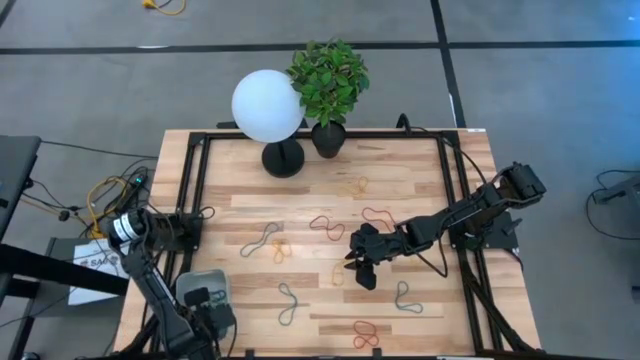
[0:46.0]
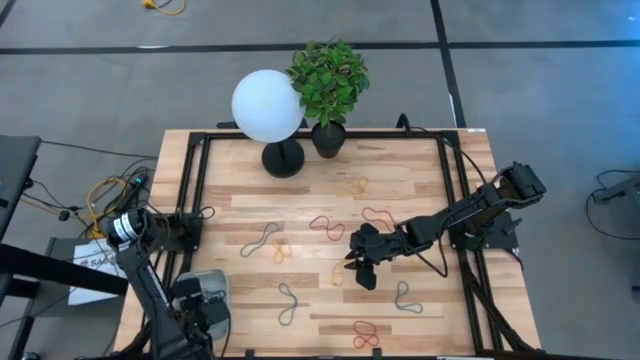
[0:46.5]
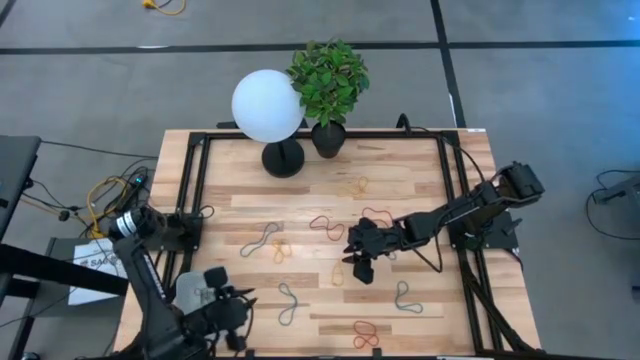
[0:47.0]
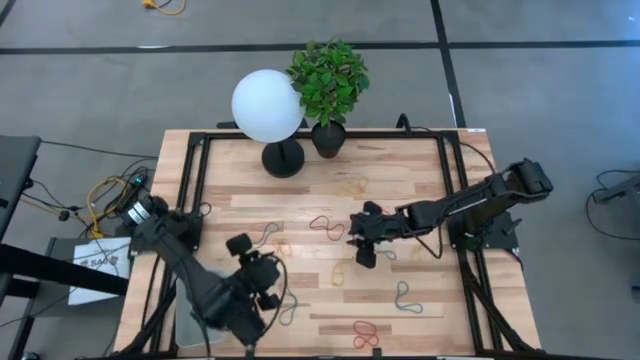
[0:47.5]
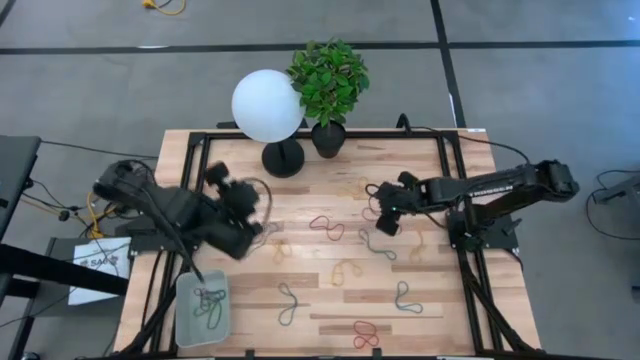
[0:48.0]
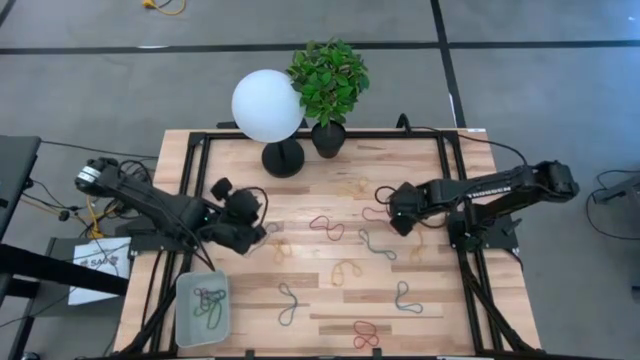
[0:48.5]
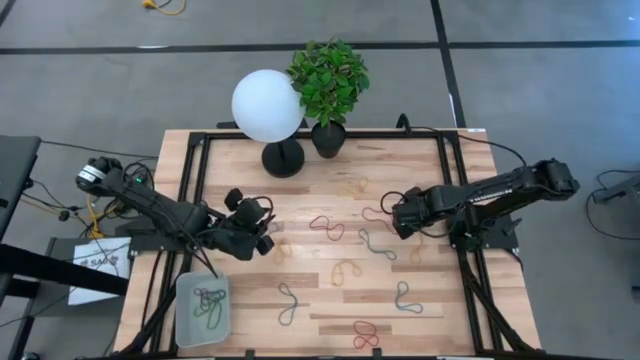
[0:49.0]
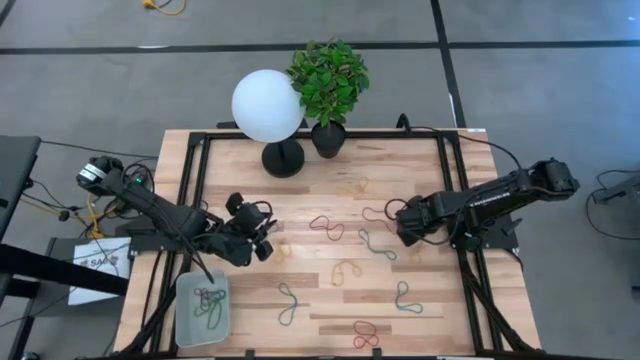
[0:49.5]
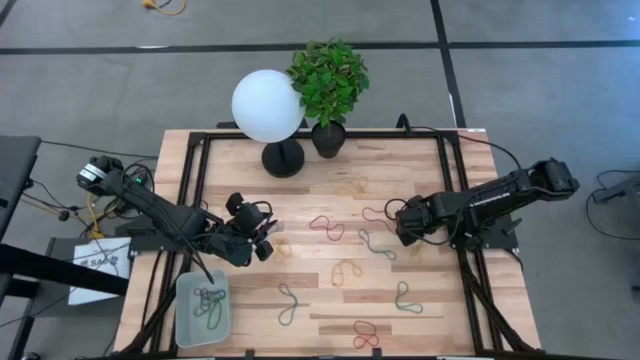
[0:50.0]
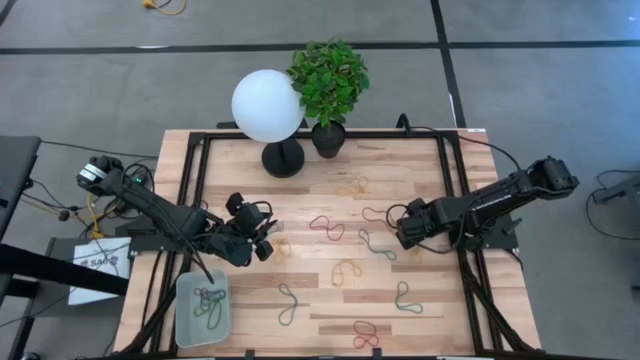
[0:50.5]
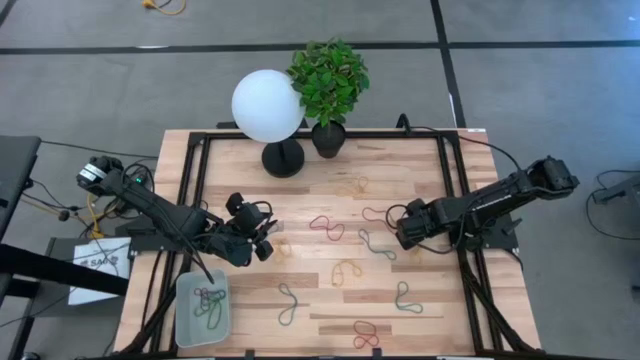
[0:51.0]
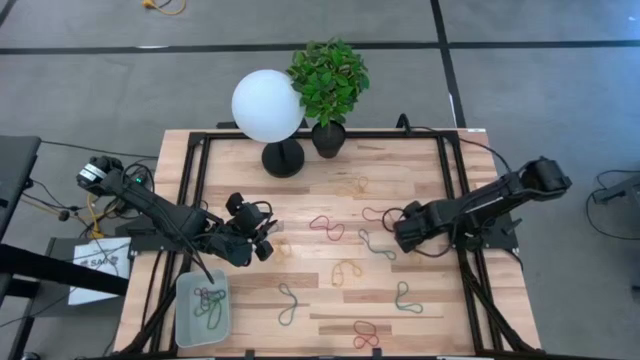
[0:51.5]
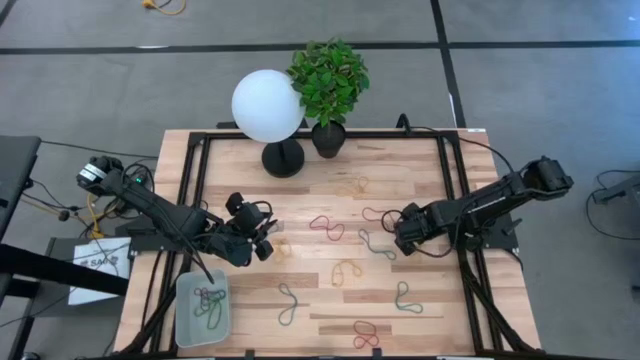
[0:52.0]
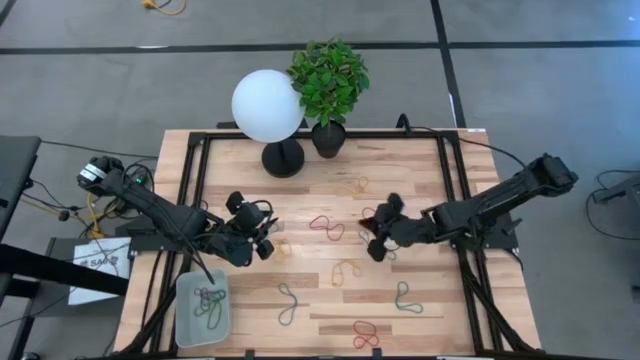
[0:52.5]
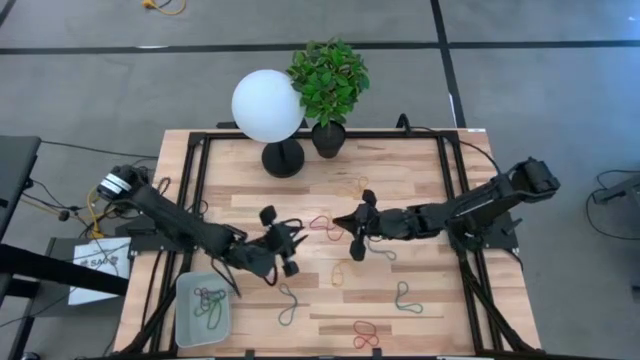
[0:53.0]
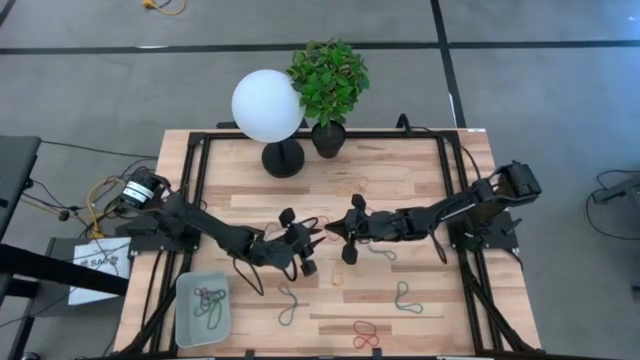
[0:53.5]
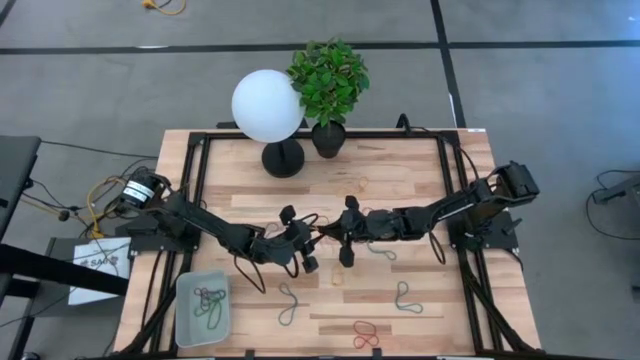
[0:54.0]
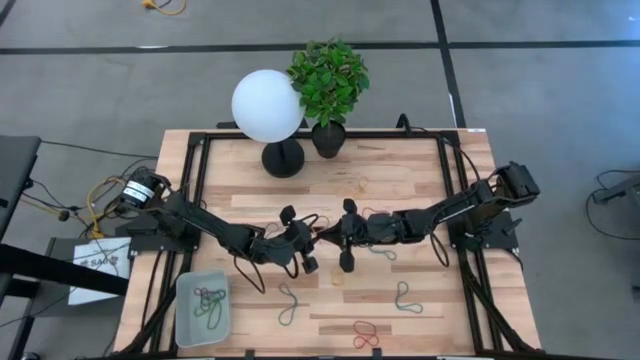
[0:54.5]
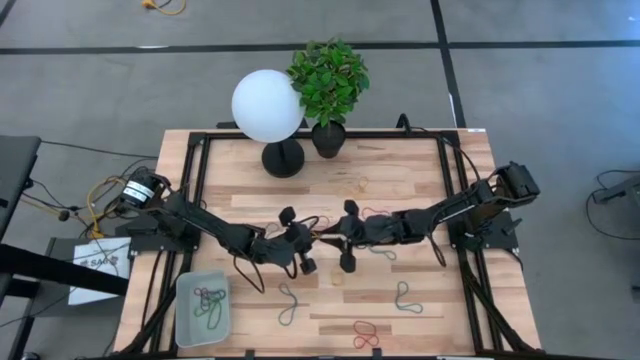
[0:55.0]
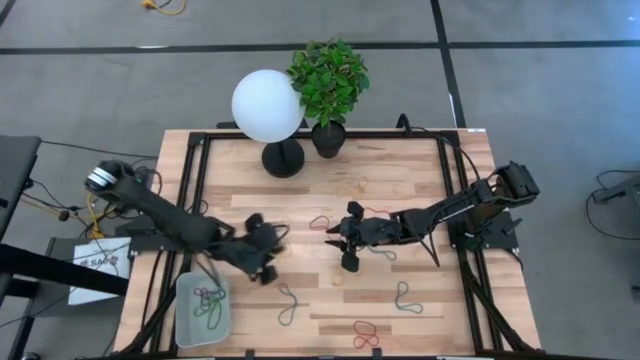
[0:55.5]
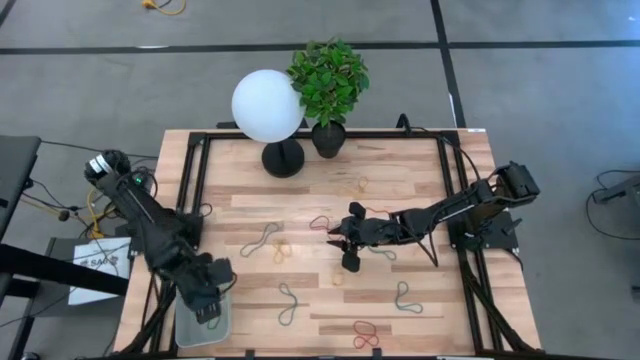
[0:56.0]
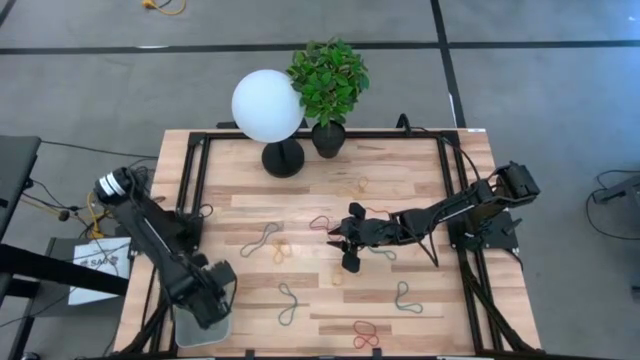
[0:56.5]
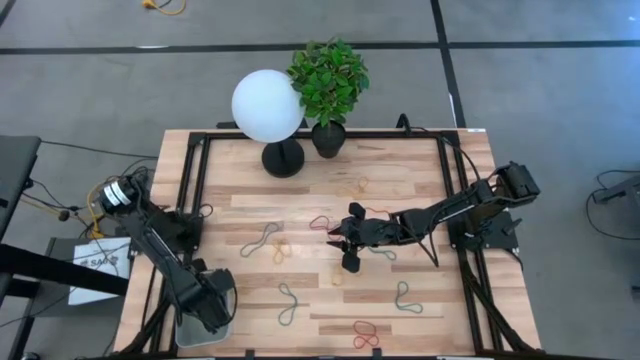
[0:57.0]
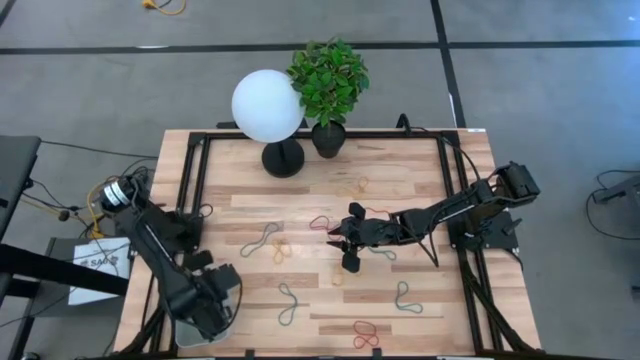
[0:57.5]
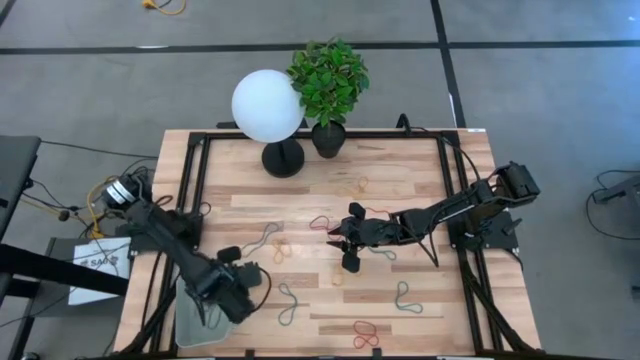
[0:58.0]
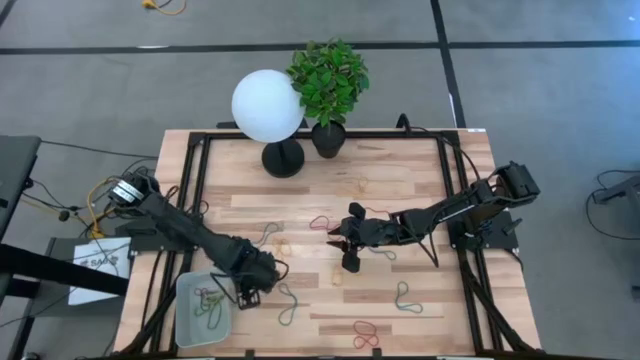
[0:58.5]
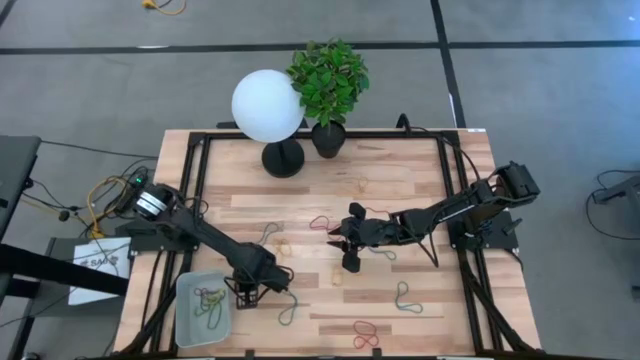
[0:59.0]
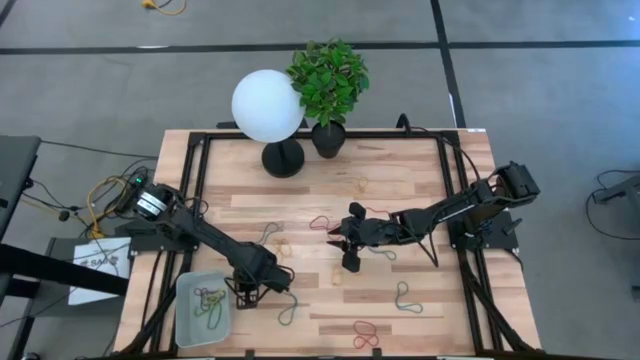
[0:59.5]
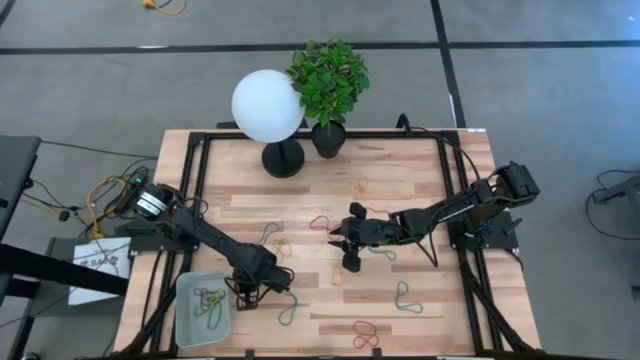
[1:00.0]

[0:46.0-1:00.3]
Task: Pick and place items into bin
Put the yellow rubber band into the gray bin

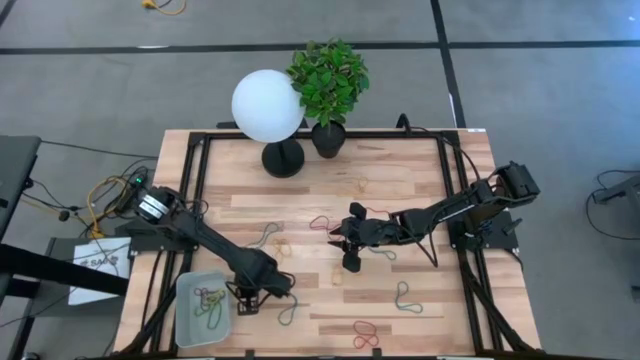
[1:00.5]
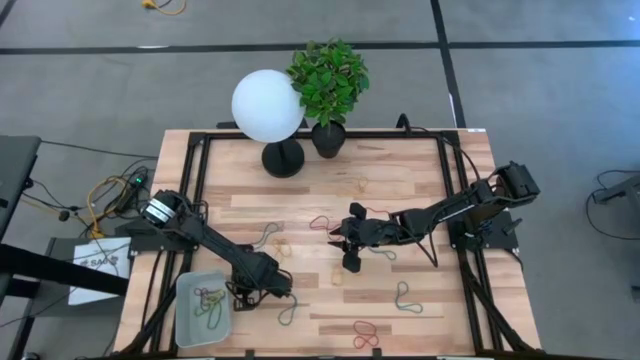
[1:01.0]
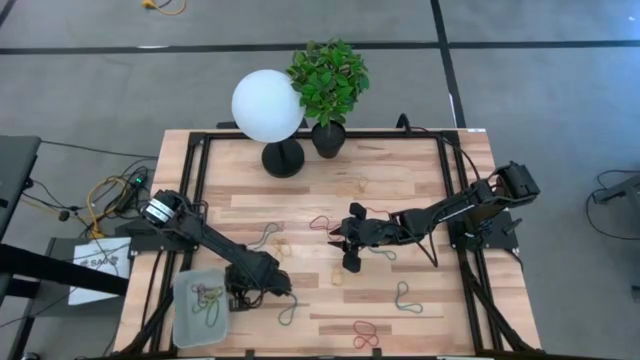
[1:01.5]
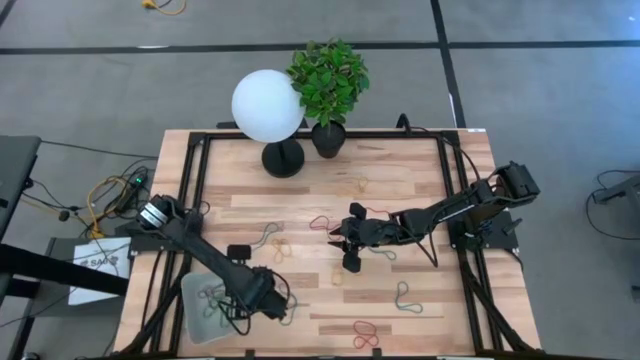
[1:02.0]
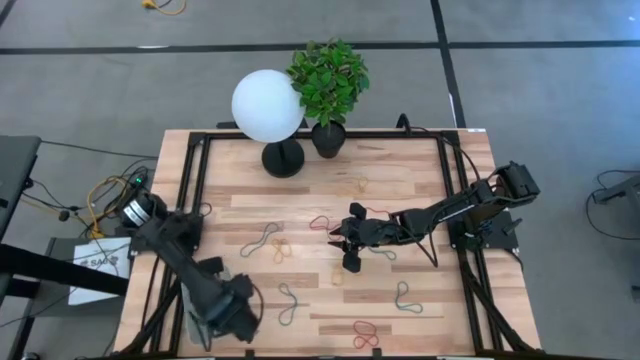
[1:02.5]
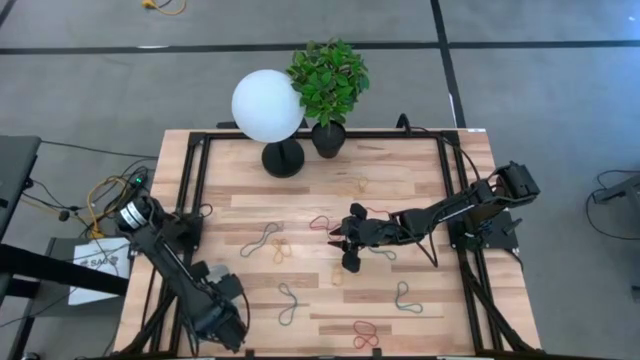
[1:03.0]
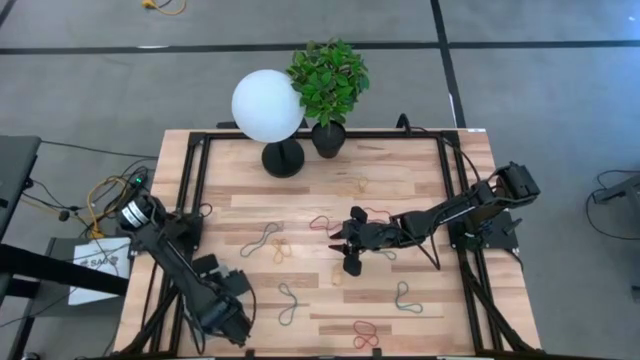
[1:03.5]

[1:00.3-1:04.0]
Put the yellow rubber band into the gray bin

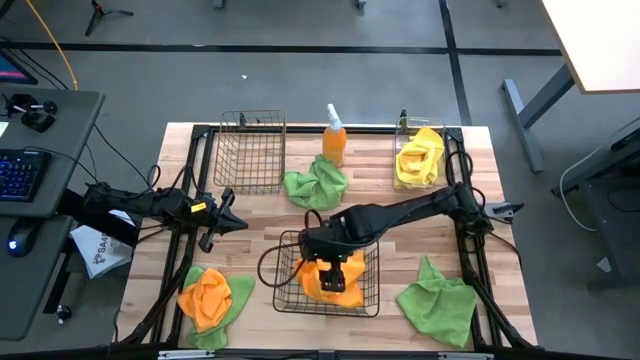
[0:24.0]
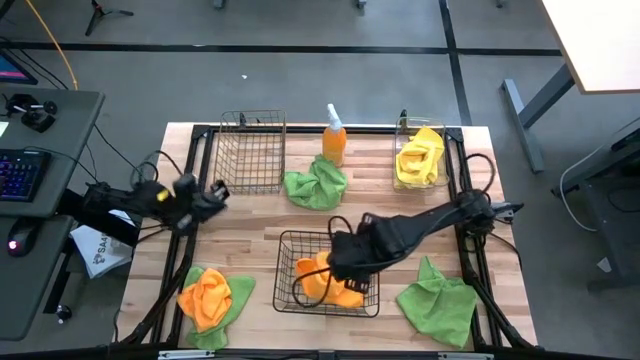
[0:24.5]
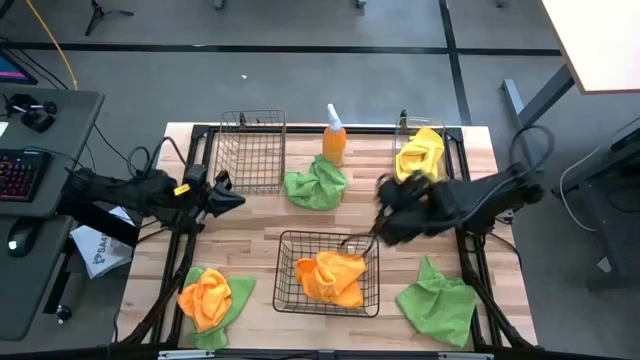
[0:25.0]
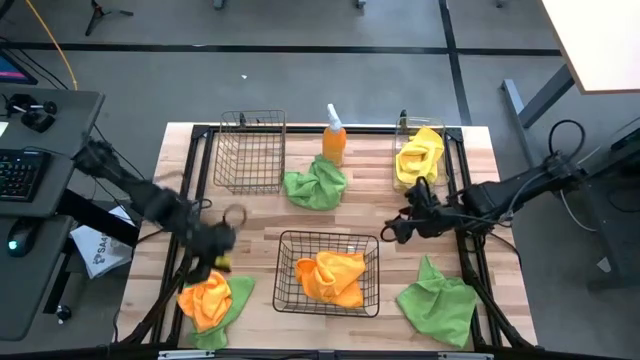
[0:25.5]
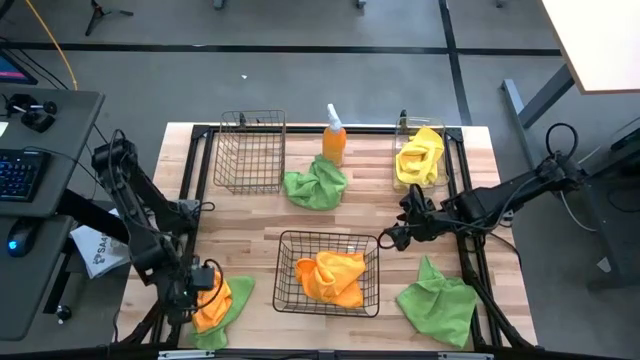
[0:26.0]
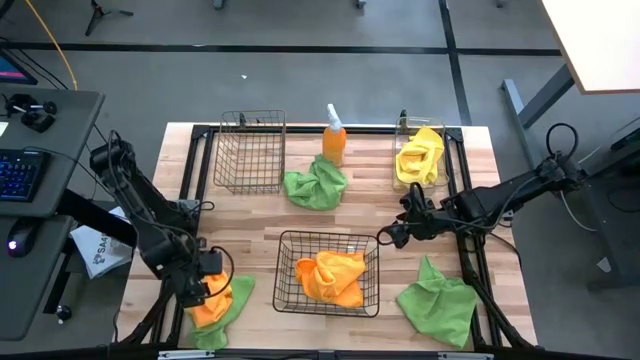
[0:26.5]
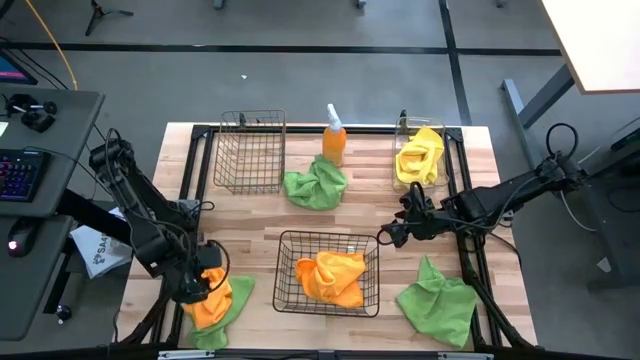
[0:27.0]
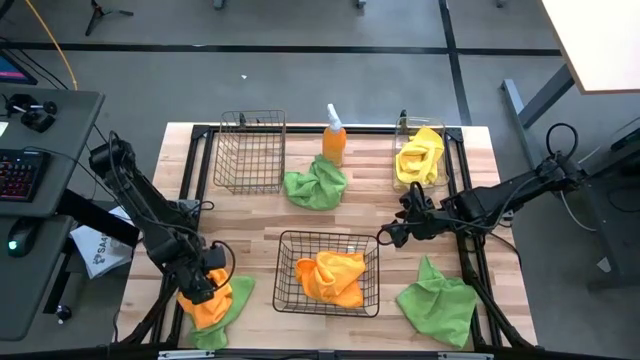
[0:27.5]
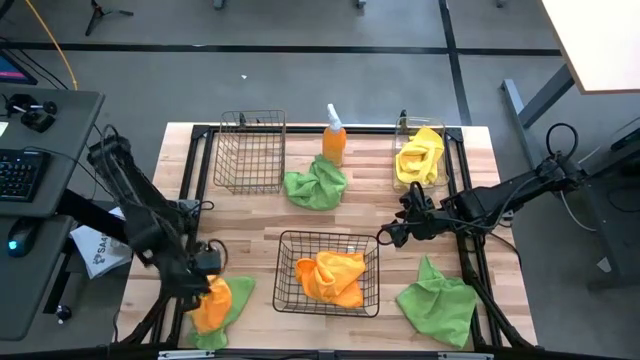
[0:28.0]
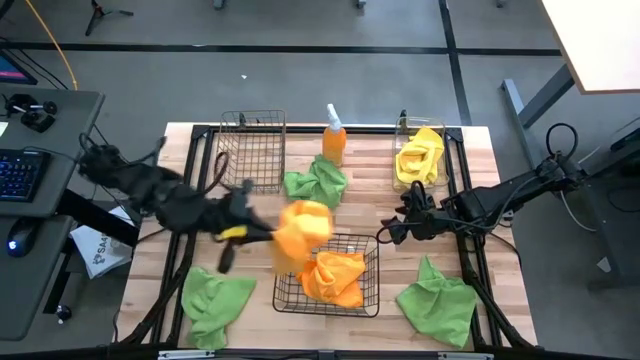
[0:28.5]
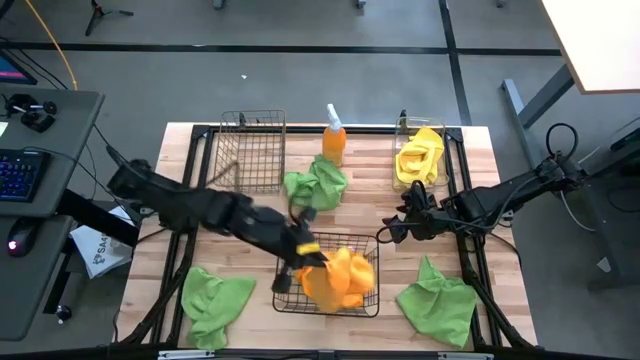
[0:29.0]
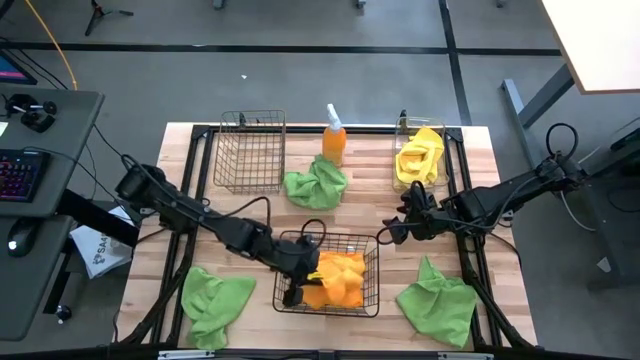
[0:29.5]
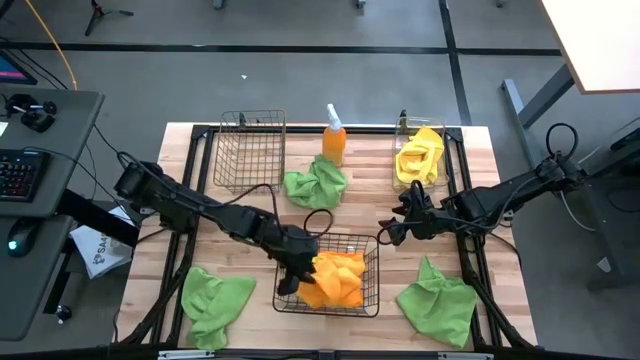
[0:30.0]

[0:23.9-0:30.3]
Task: Sort microfiber towel by color & place in baskets
Put the orange microfiber towel into the black wire basket
